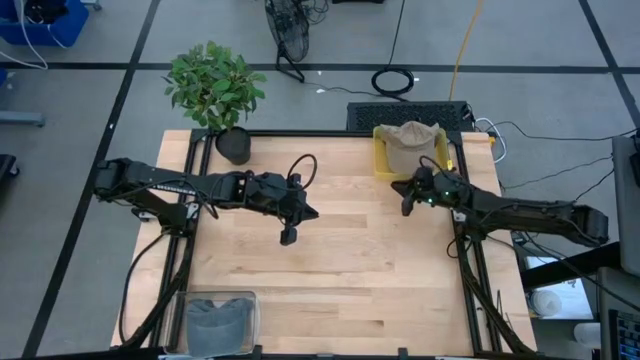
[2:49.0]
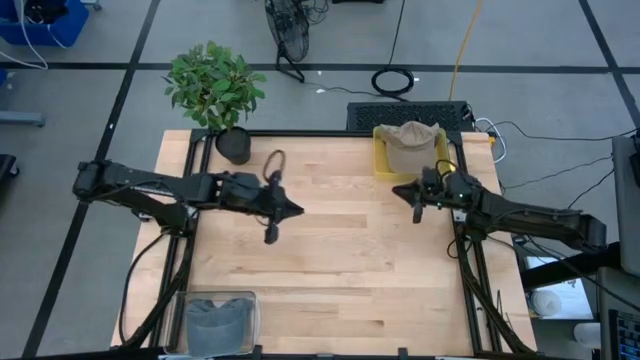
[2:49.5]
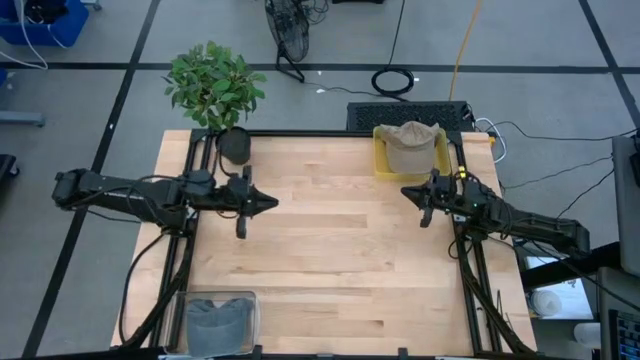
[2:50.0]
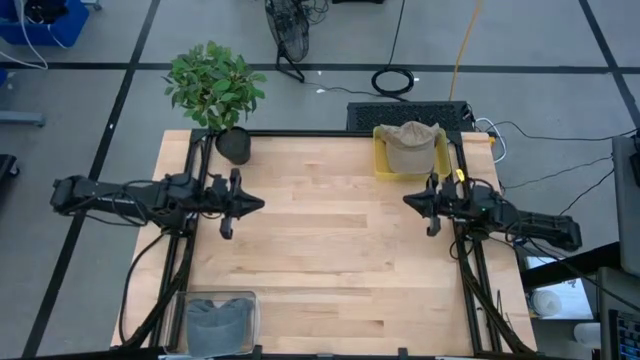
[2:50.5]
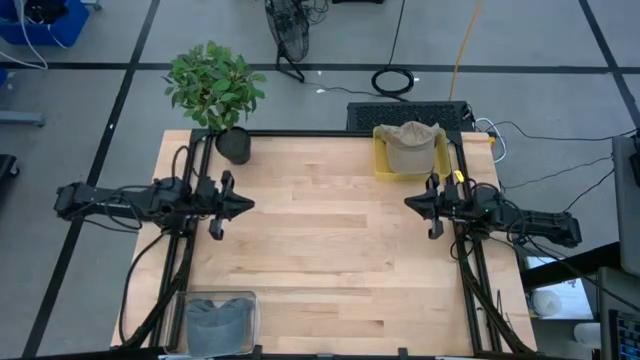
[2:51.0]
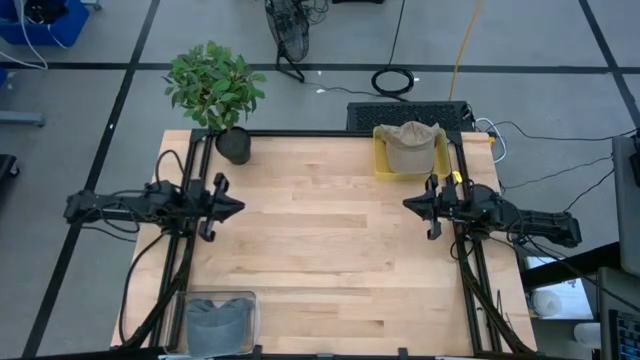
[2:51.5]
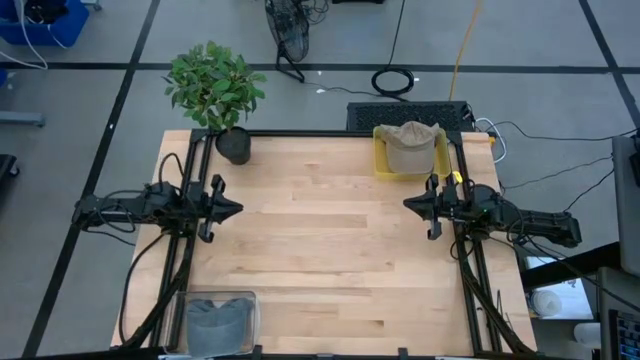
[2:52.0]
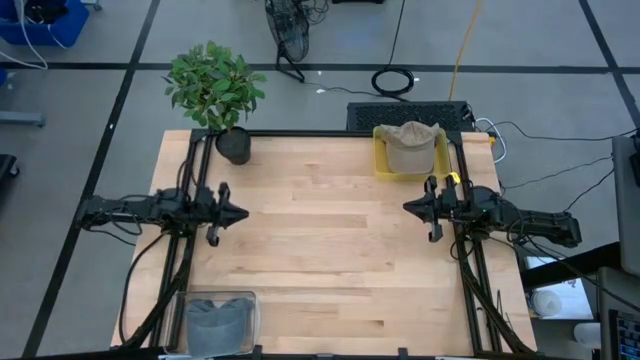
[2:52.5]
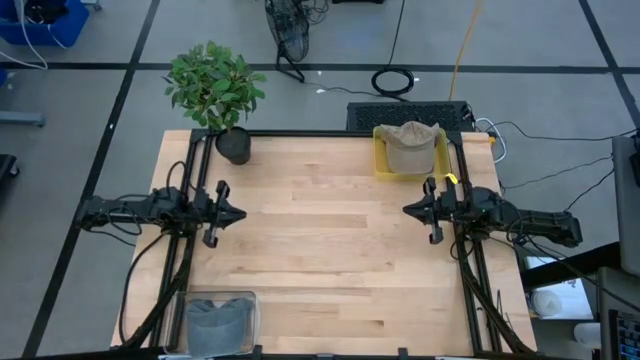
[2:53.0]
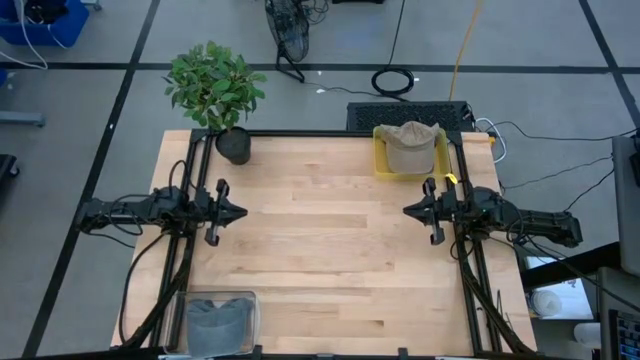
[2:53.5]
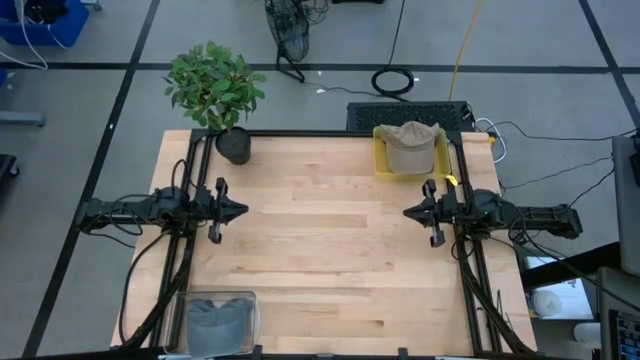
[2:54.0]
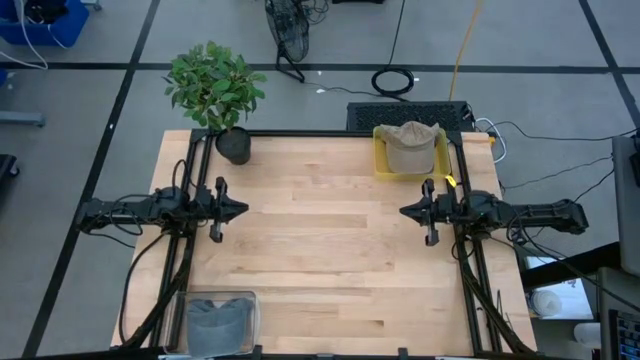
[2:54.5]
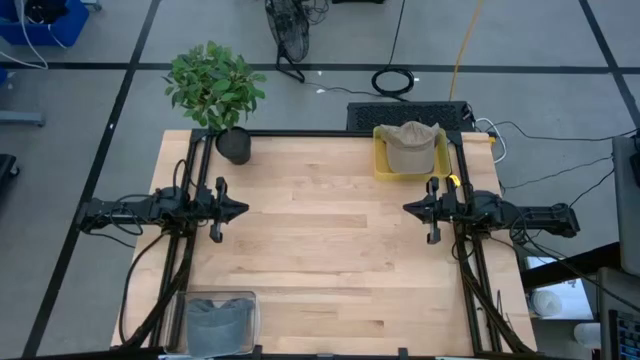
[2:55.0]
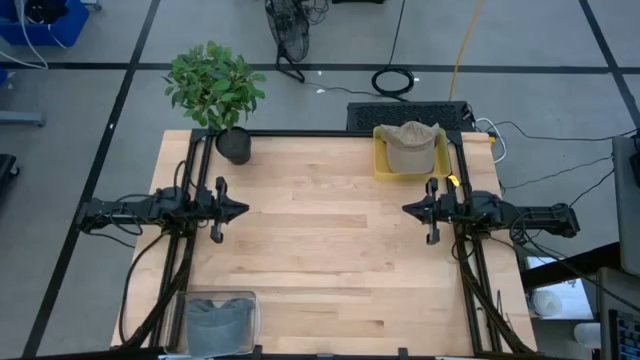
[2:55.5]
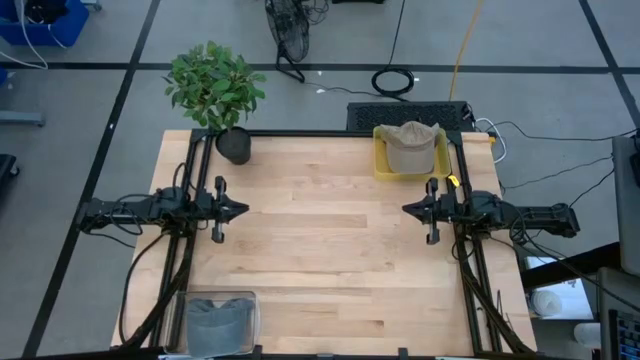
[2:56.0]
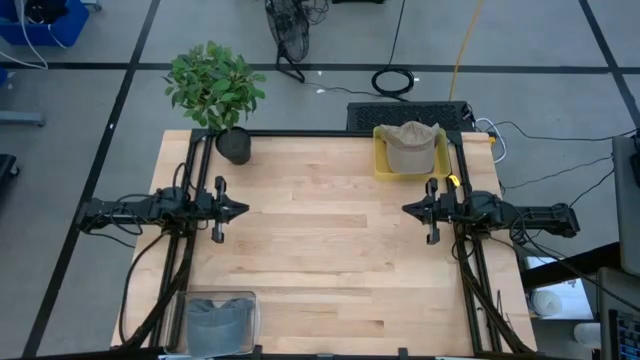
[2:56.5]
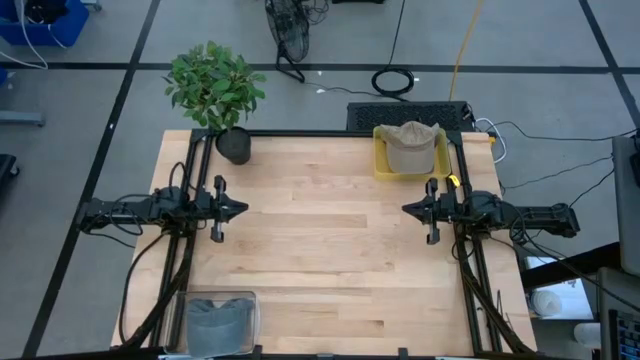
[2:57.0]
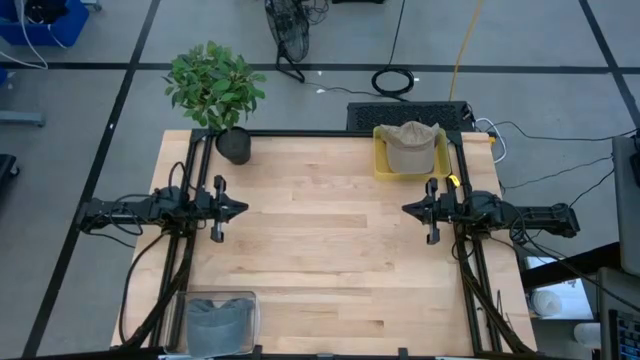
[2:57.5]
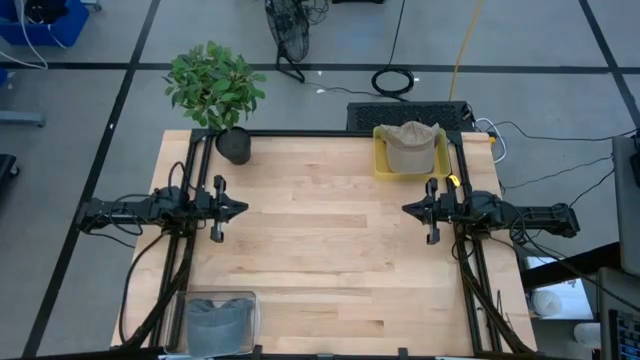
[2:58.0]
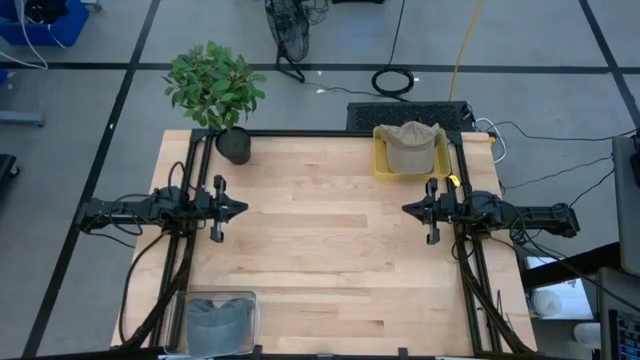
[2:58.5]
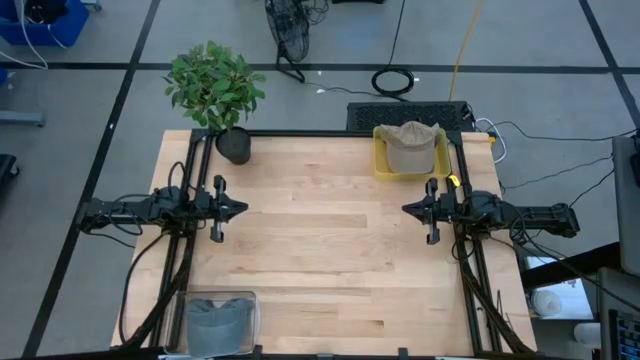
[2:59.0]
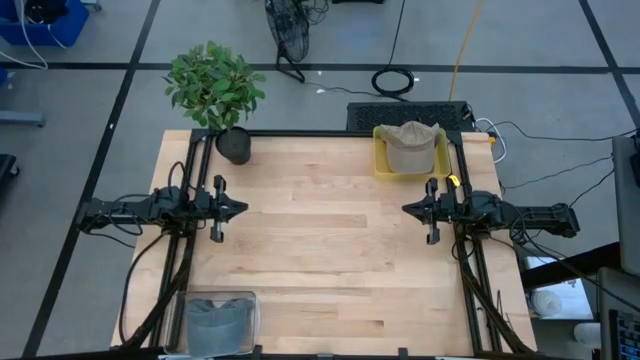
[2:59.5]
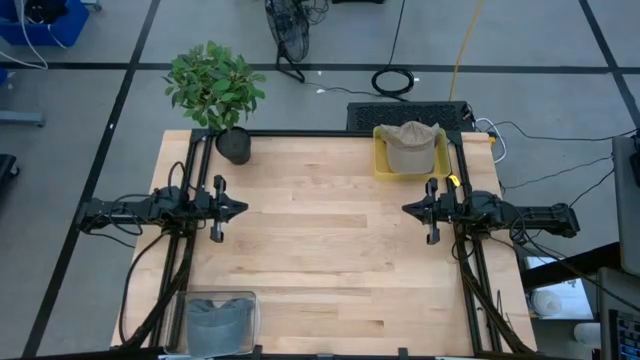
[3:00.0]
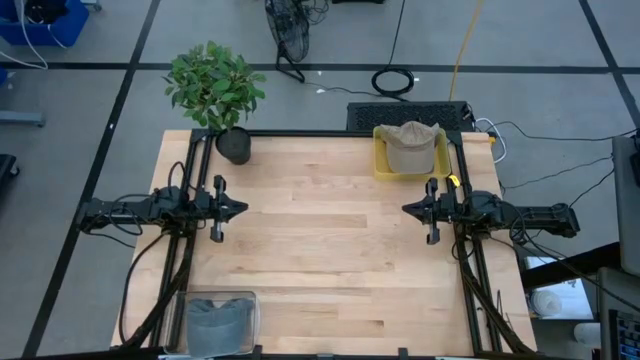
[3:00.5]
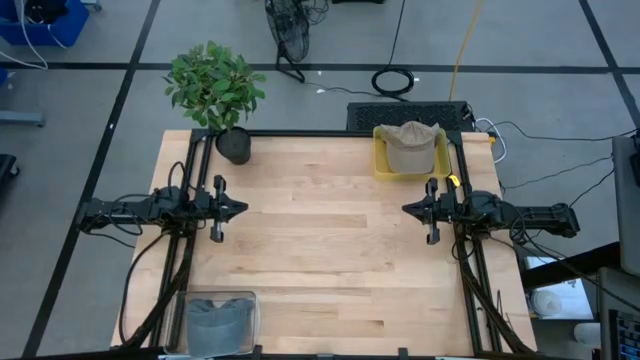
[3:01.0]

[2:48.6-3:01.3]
Task: Pick & Place hat
Return to Home position

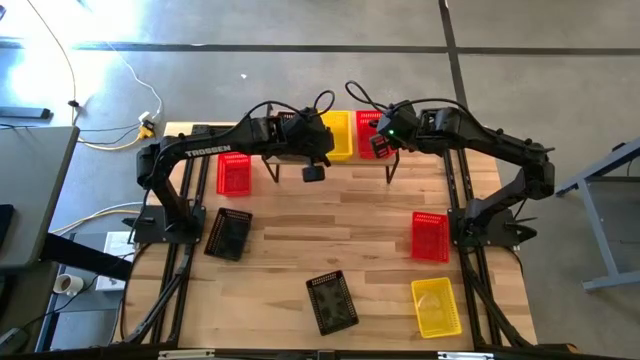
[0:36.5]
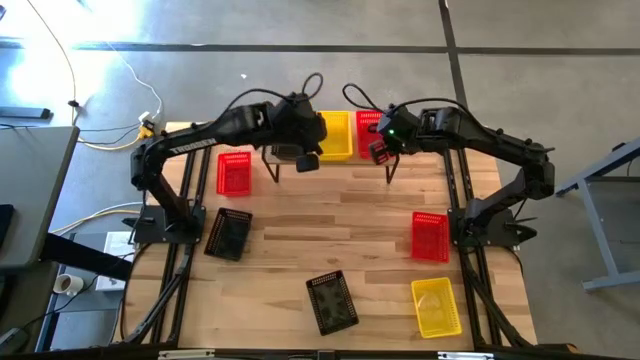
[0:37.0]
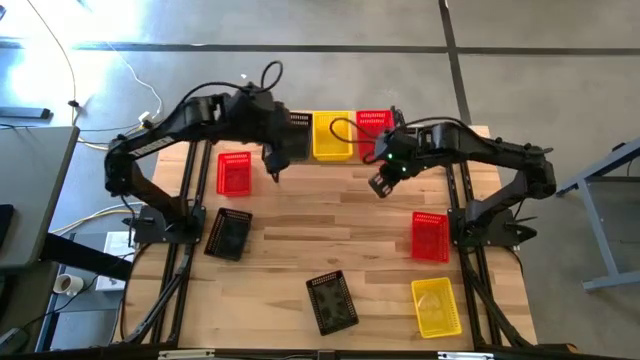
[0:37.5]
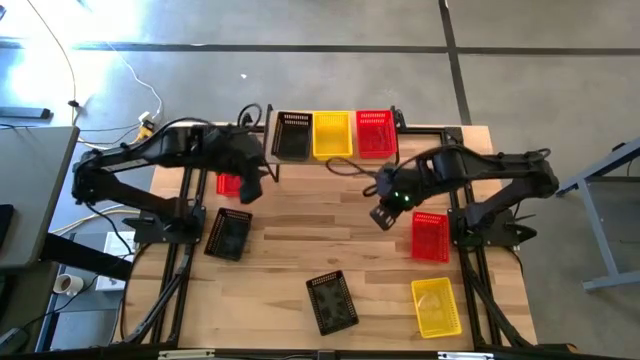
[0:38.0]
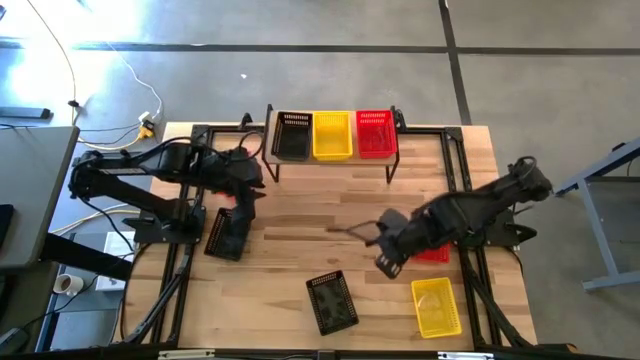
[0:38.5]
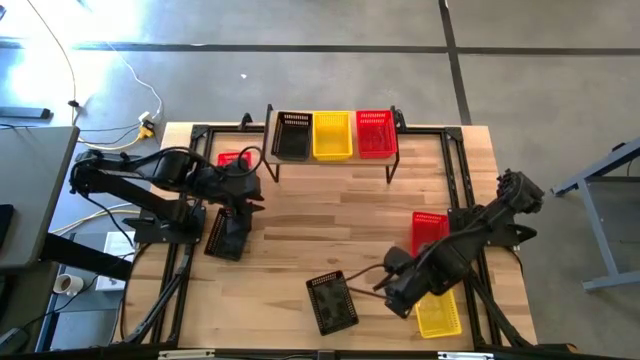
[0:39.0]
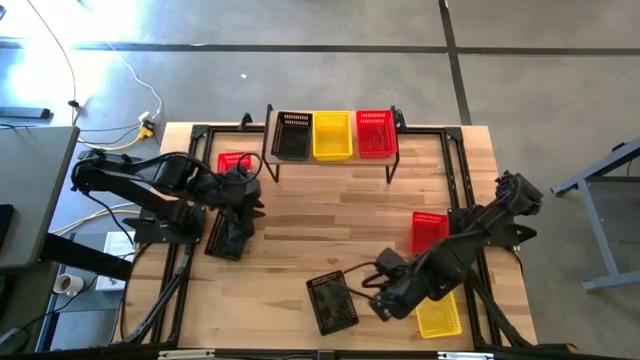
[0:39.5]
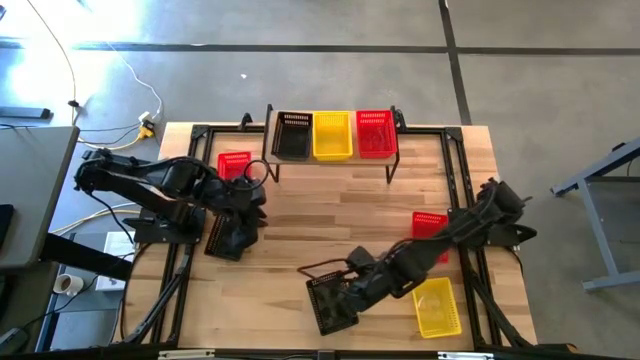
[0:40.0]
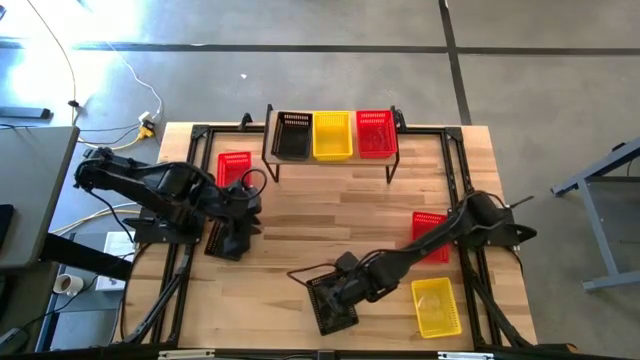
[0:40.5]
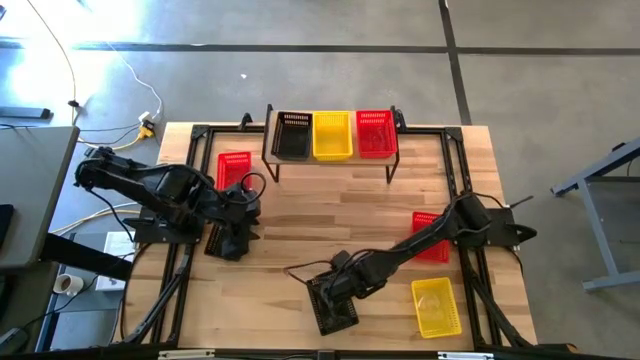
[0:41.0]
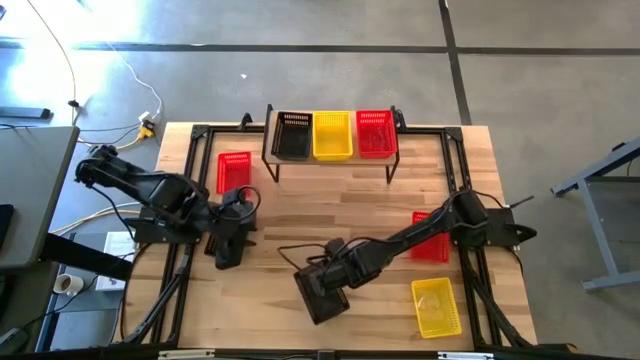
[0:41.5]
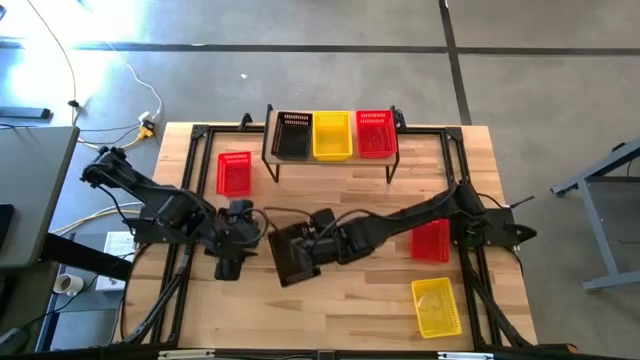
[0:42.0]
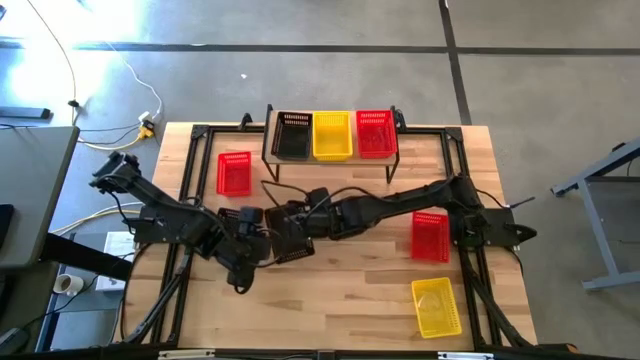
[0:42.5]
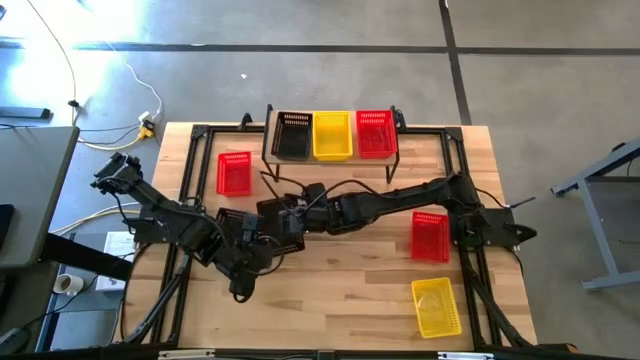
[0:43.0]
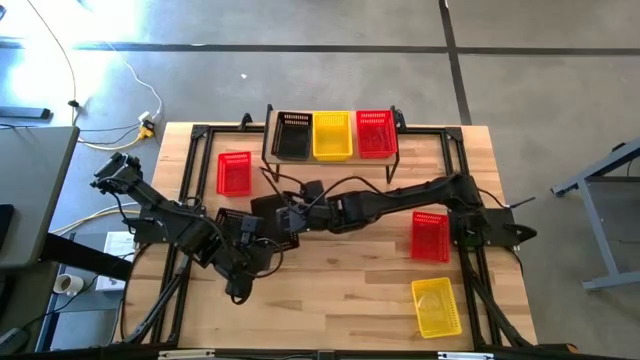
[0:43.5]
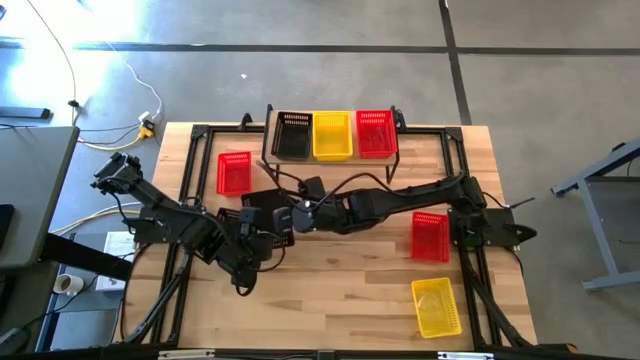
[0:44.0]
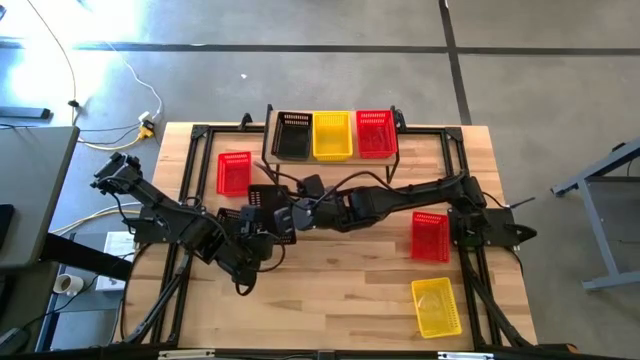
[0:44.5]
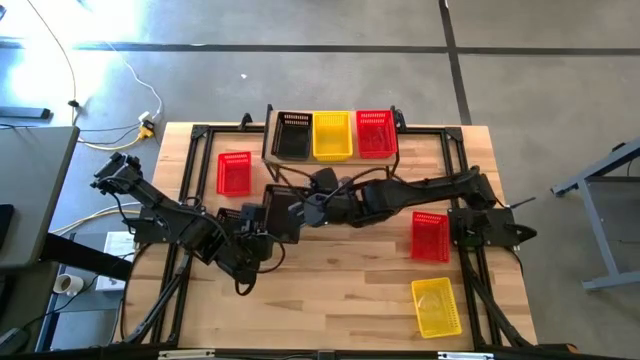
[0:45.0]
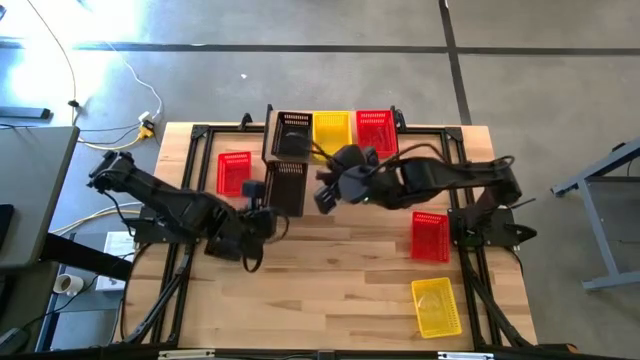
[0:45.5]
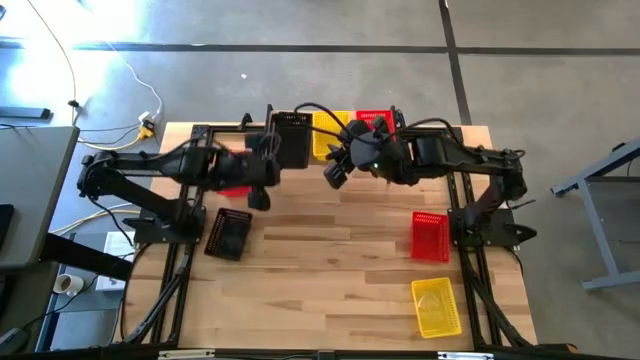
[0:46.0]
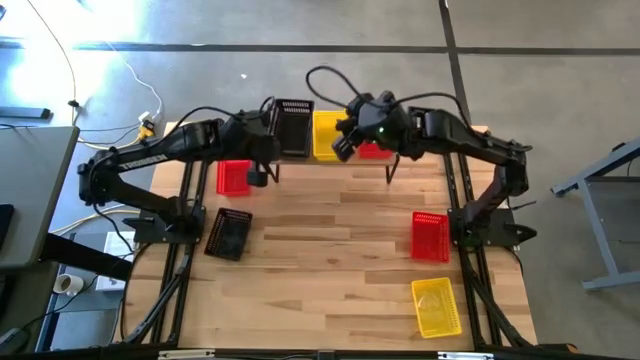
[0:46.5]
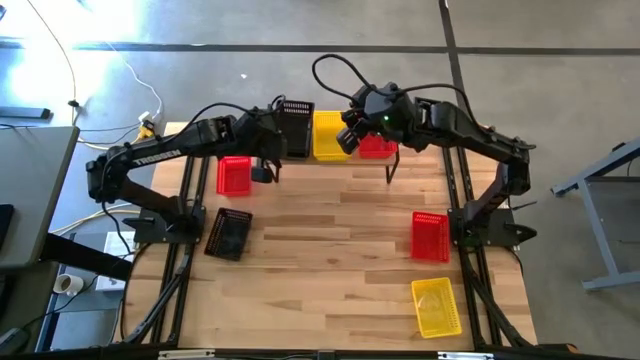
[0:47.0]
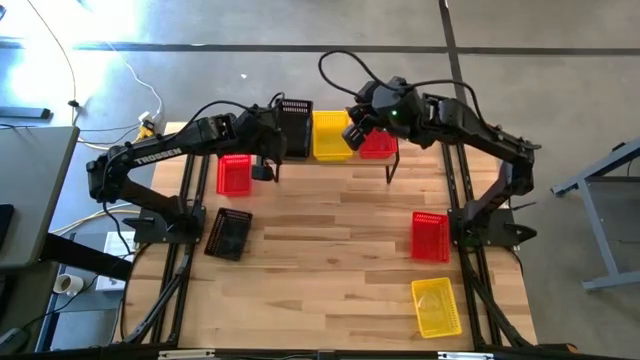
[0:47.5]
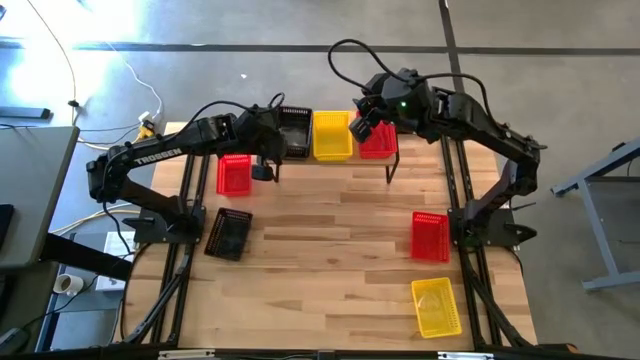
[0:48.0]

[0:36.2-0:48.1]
Task: Stack baskets on shelf by color
Stack the bottom black bin on top of the black bin on the shelf
